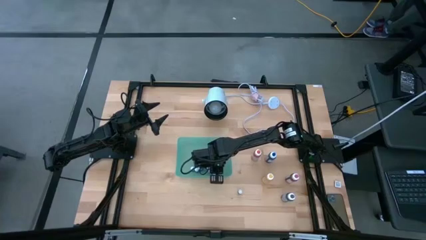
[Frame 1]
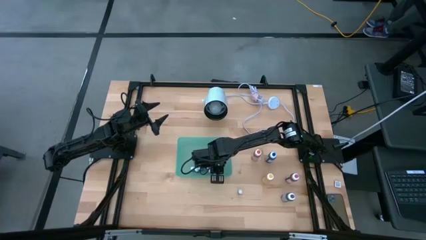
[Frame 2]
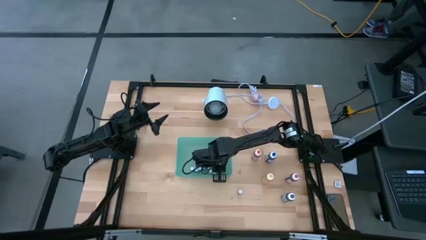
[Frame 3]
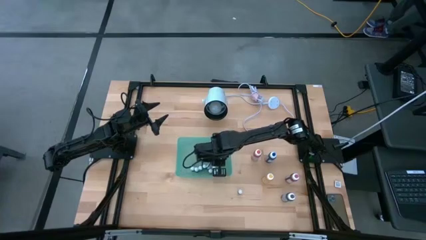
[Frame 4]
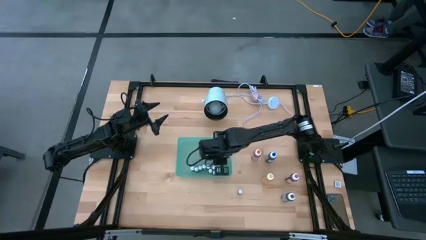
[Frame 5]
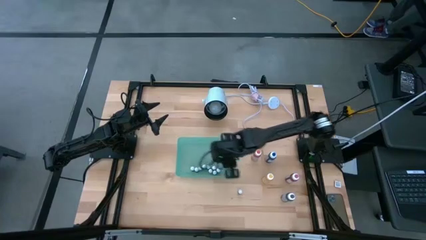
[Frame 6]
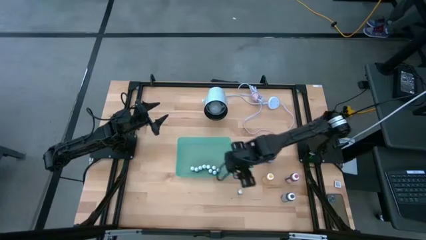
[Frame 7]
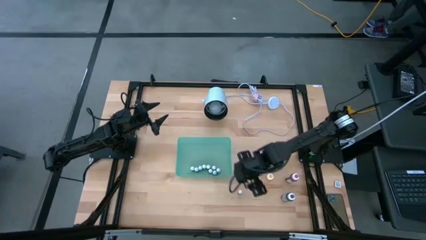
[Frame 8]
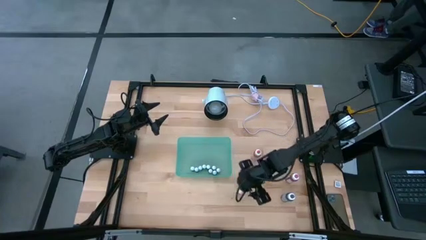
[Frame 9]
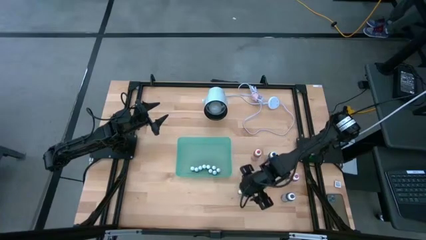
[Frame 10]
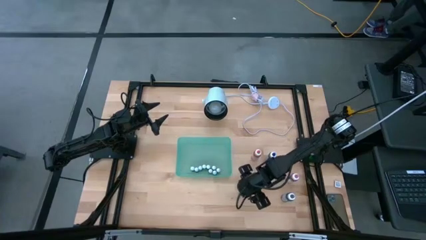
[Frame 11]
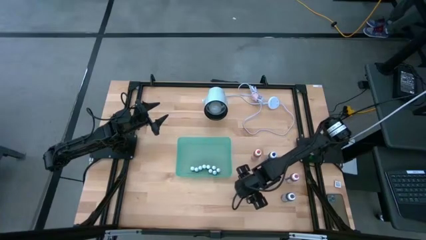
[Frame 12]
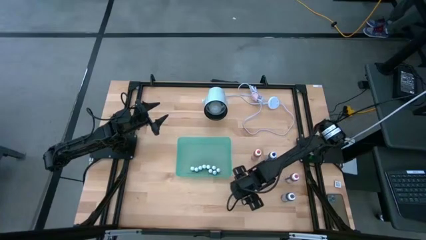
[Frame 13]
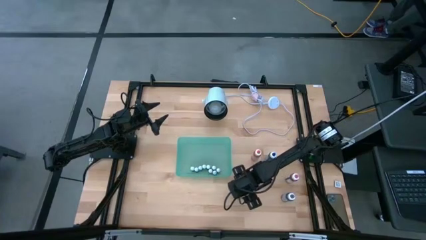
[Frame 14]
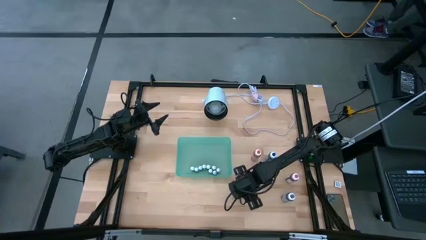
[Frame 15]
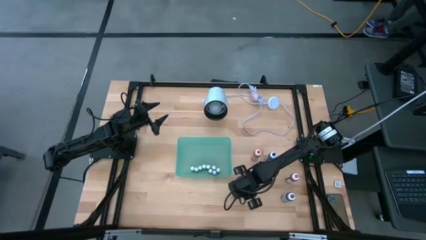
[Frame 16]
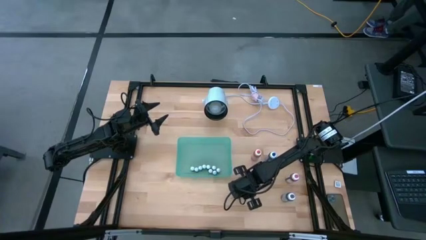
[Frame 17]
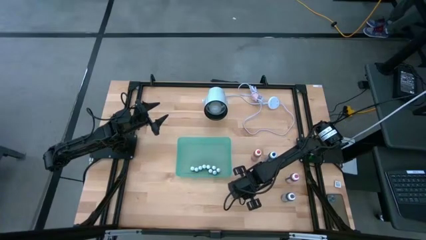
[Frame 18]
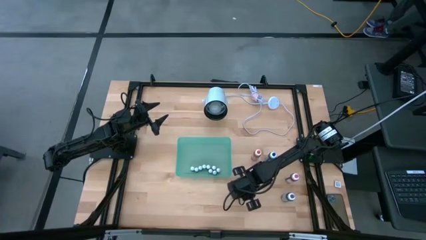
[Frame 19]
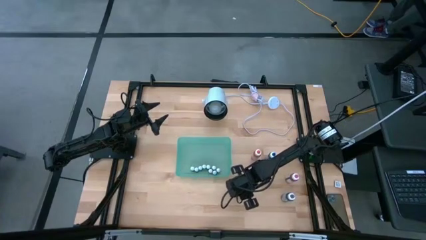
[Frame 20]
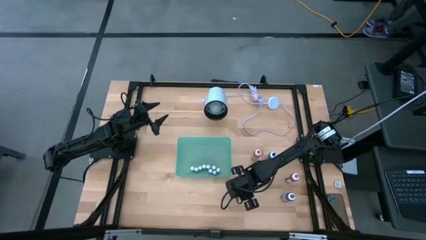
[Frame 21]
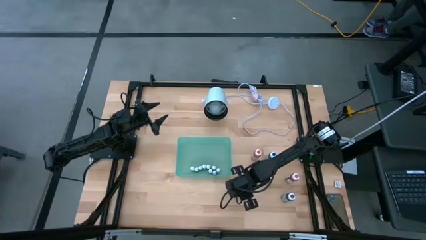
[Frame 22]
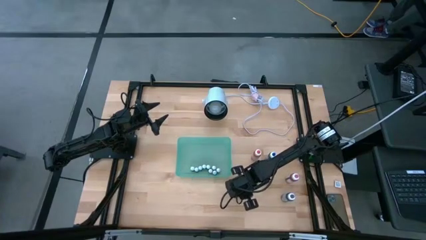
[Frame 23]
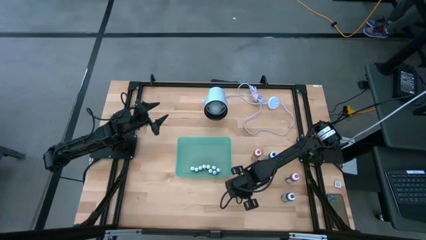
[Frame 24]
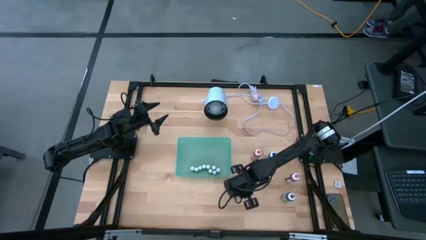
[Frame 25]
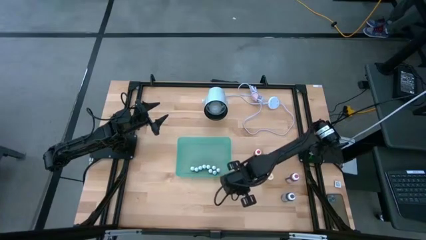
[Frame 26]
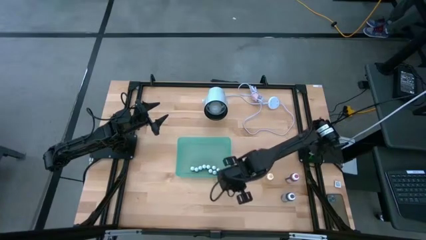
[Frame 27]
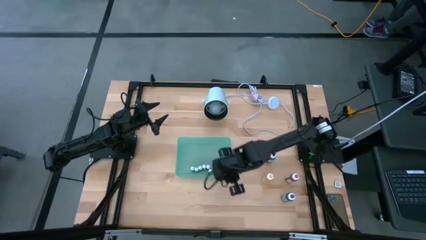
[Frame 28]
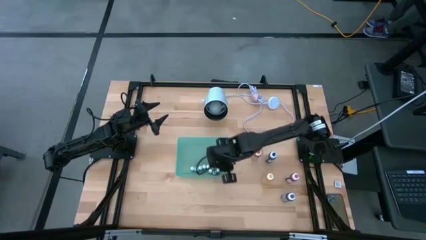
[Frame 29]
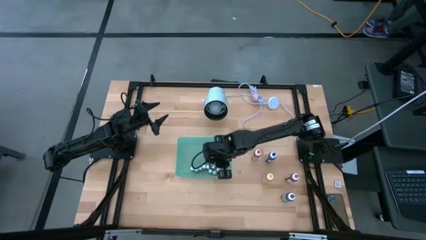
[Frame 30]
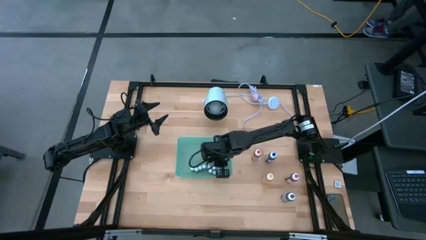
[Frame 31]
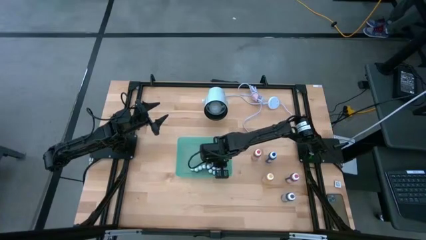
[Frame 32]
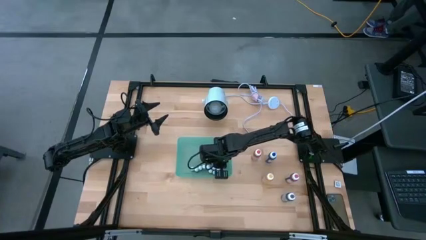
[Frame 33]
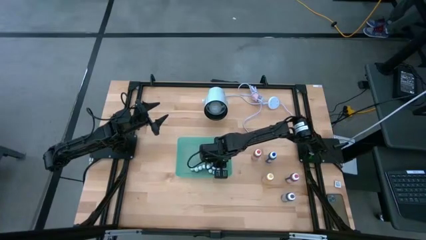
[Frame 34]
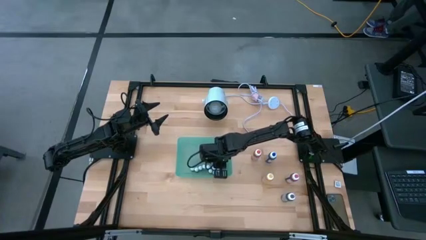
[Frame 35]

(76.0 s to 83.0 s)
Task: Pick & Place food coloring
Put the small black food coloring bottle into the bin

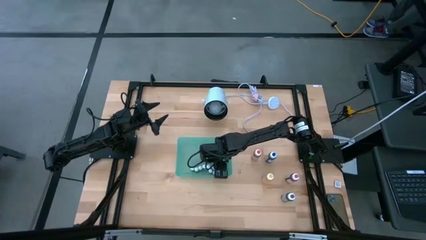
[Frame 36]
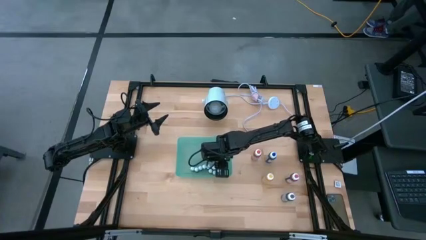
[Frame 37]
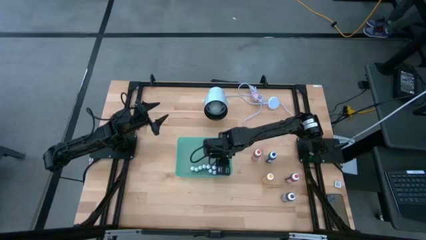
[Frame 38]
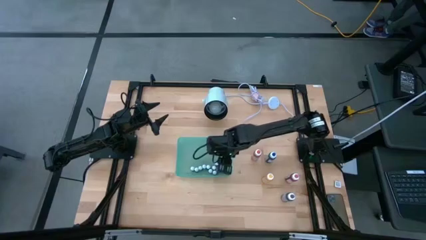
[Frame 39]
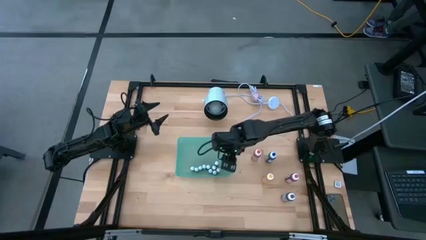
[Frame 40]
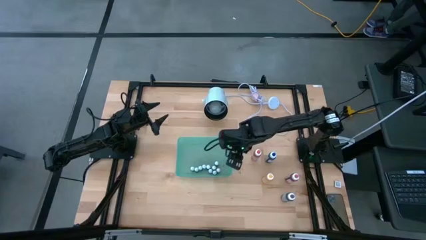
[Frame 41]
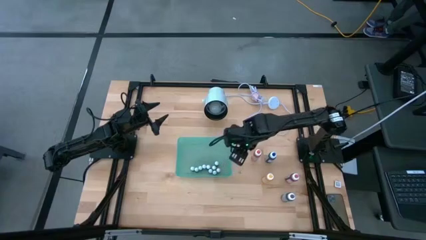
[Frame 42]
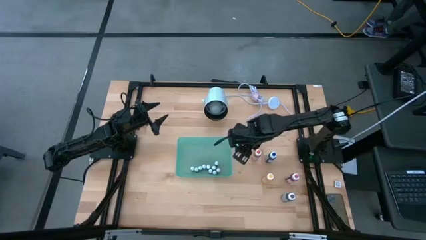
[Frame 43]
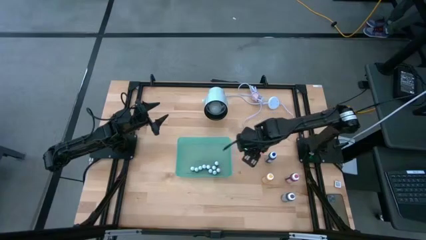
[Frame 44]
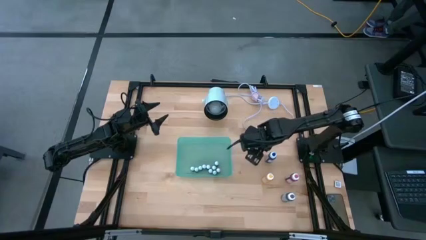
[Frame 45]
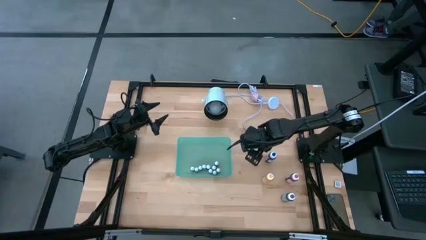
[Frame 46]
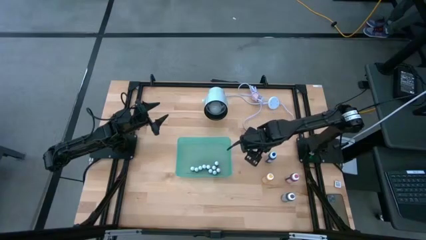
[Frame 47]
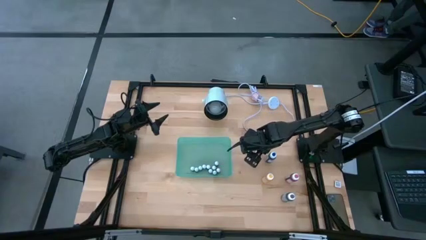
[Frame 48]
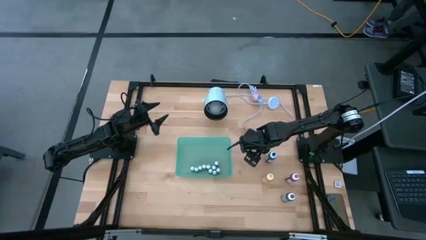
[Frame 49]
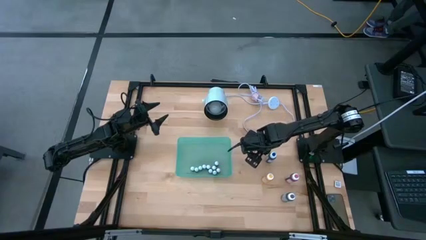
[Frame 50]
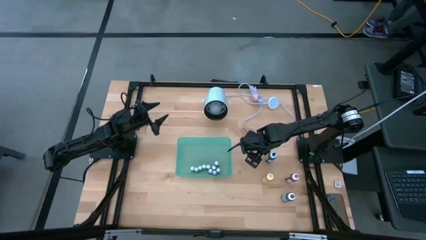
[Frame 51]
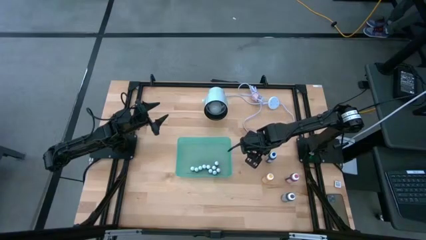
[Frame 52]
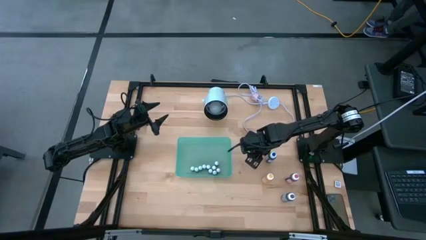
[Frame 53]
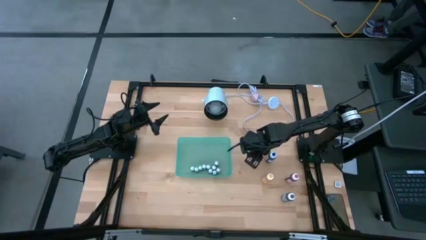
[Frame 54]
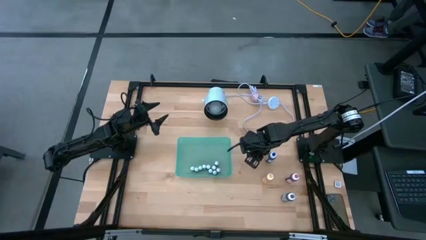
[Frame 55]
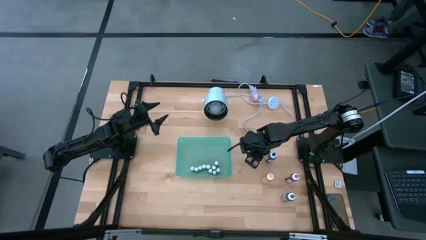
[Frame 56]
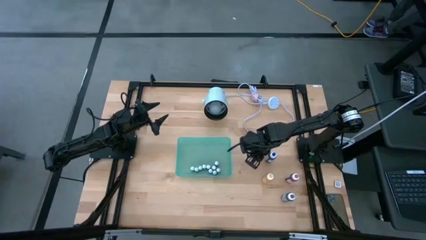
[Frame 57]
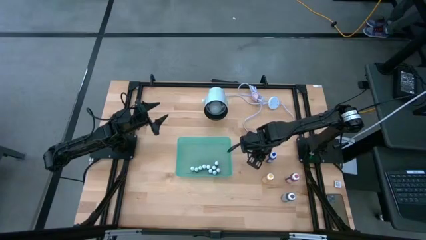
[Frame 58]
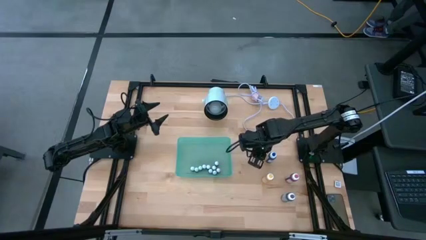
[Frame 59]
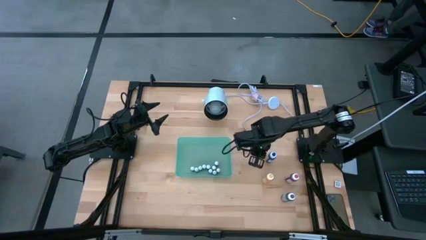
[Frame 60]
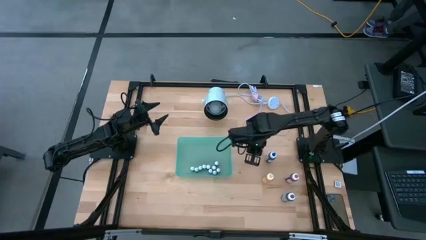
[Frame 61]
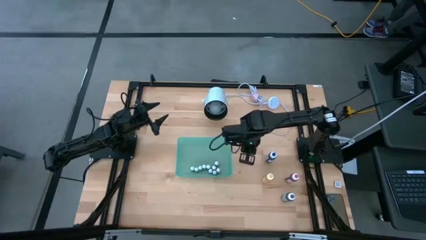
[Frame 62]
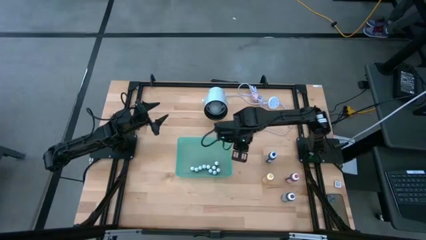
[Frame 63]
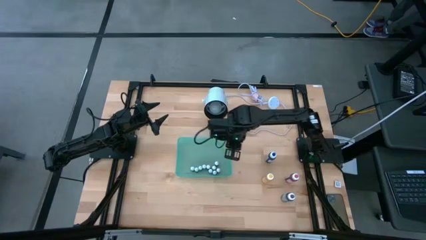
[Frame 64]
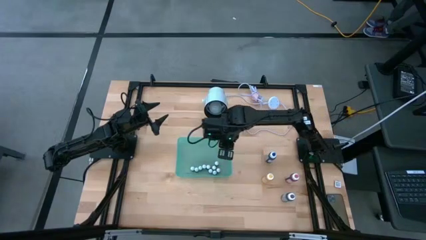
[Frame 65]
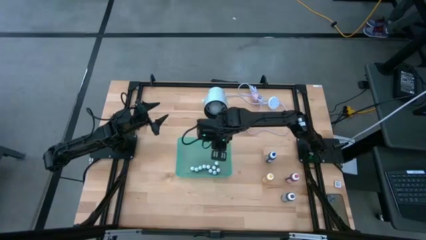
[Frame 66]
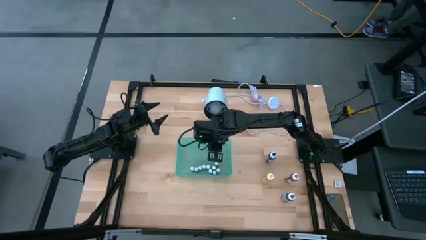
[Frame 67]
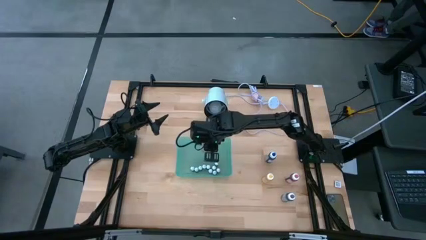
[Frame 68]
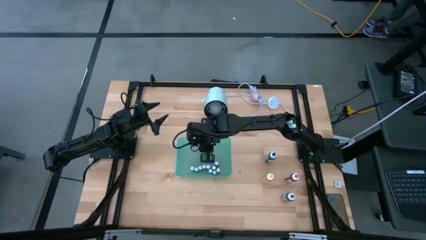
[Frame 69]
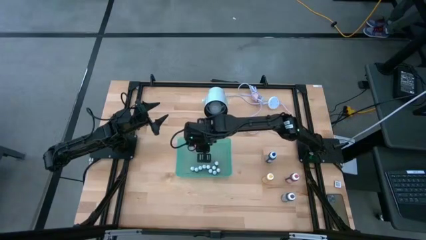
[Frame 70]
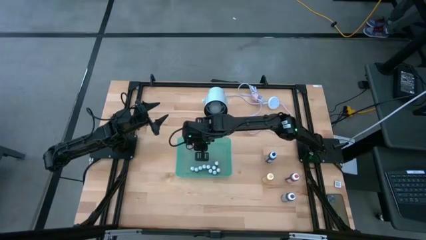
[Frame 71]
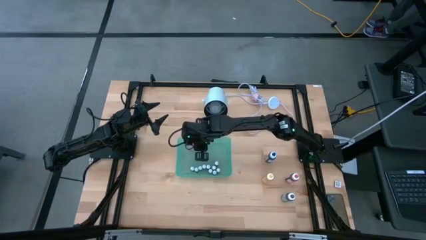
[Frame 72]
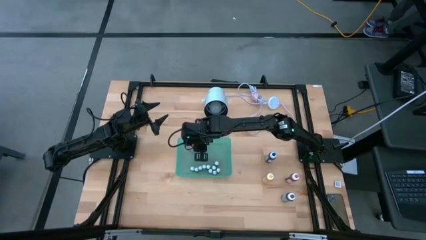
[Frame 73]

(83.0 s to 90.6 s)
Put the large orange food coloring bottle into the bin
